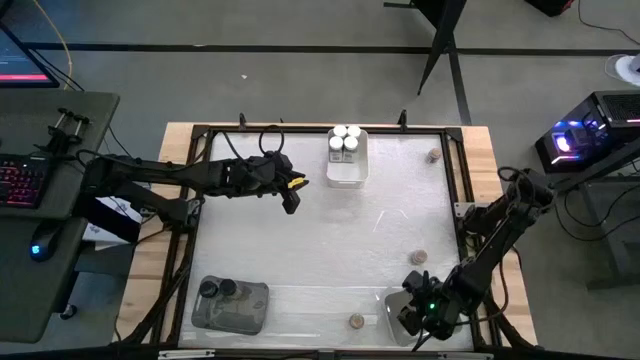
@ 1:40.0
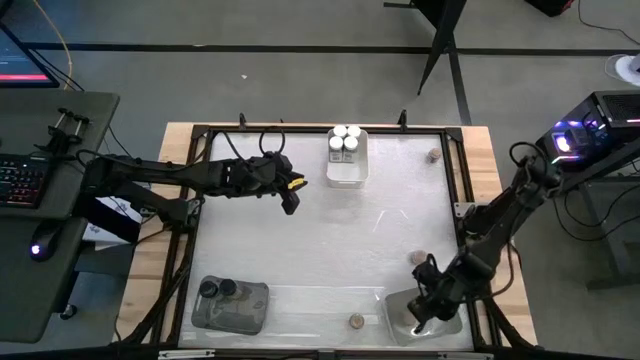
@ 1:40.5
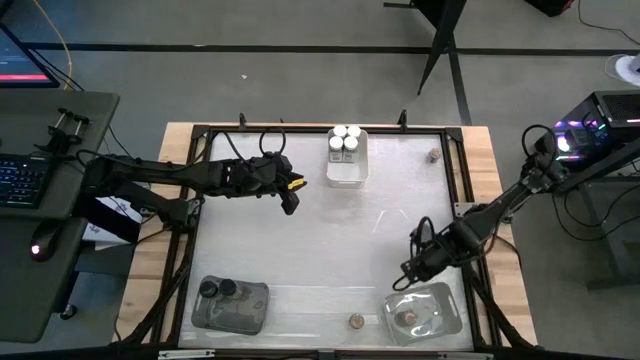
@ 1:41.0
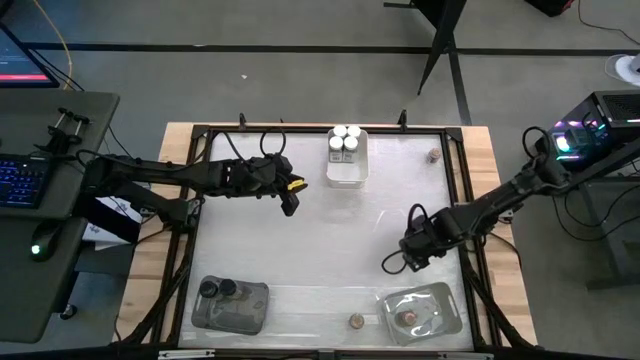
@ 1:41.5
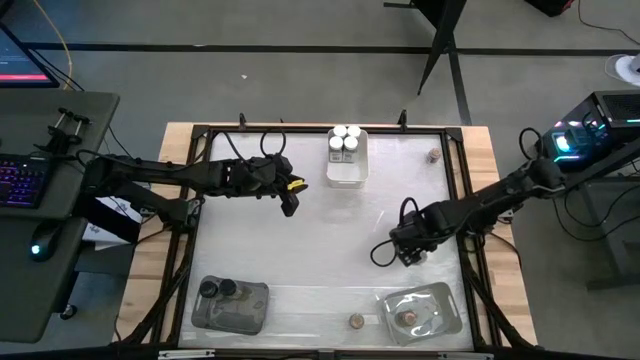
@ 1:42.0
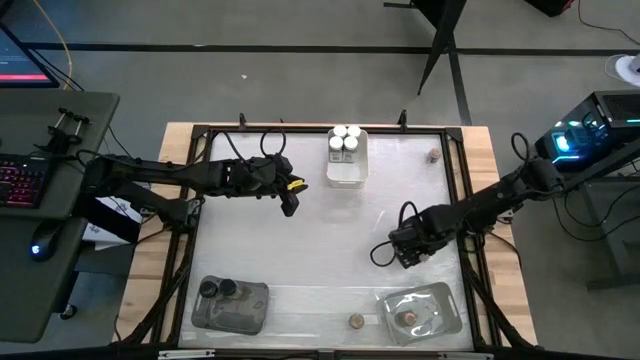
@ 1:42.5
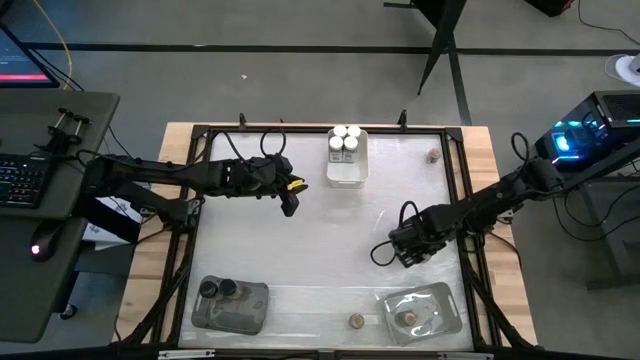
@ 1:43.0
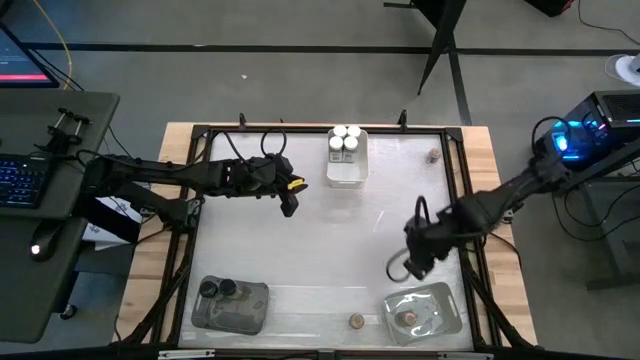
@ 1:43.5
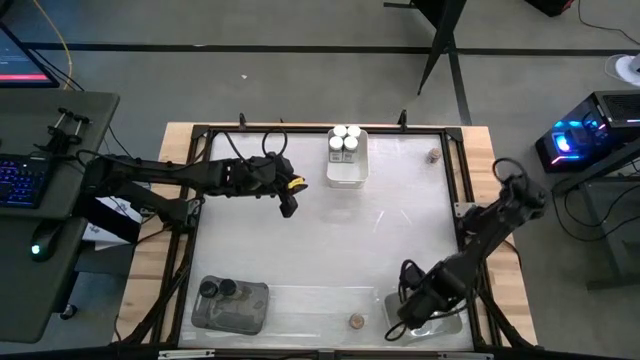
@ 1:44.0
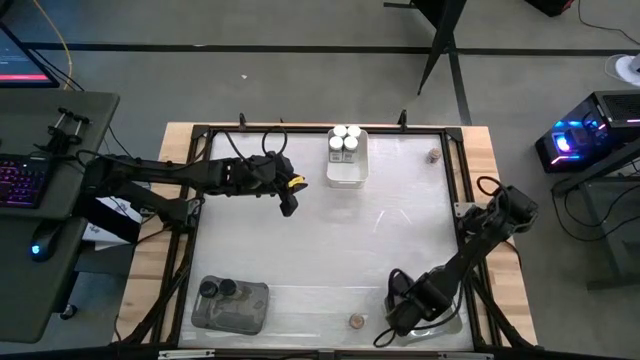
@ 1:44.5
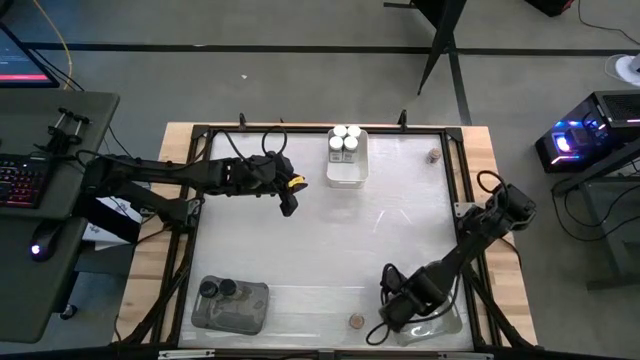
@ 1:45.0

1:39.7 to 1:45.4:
Task: Sort spices by type
Put the middle brown seasoning bottle into the gray bin

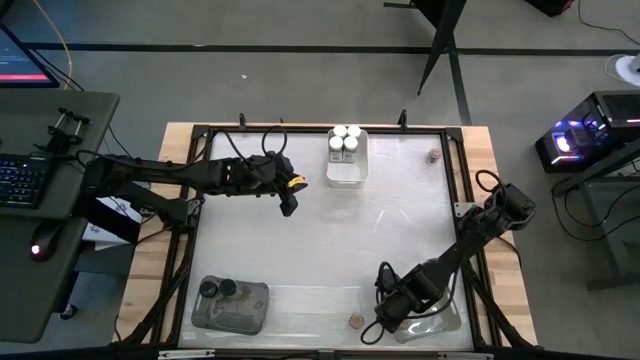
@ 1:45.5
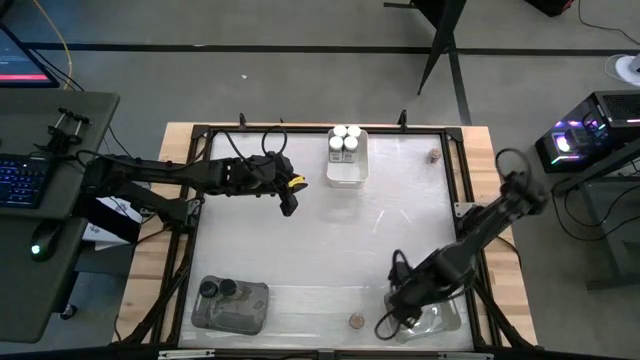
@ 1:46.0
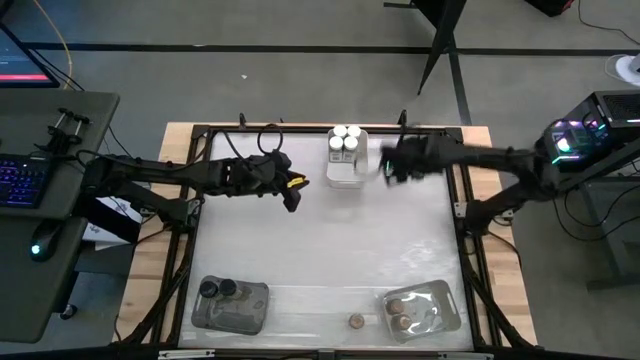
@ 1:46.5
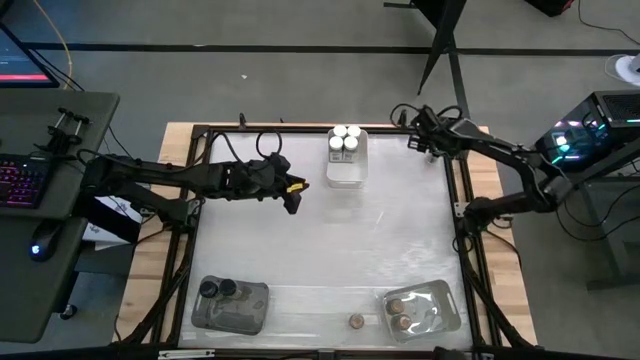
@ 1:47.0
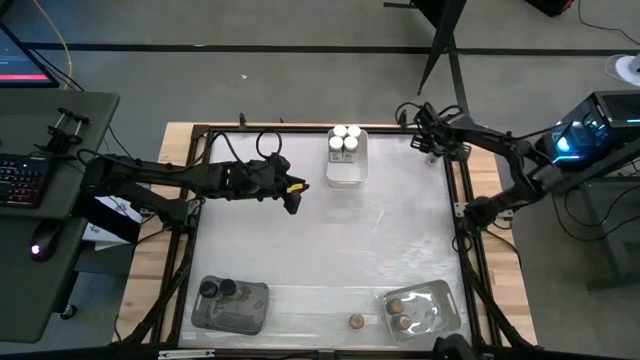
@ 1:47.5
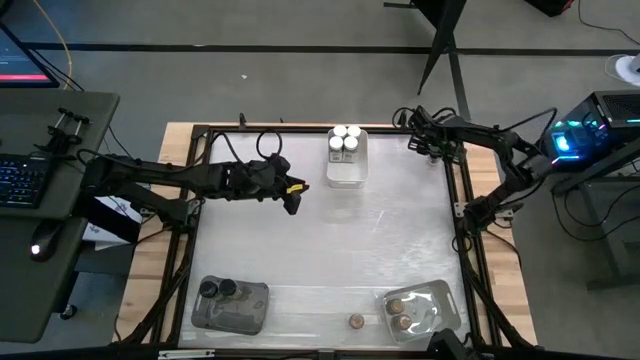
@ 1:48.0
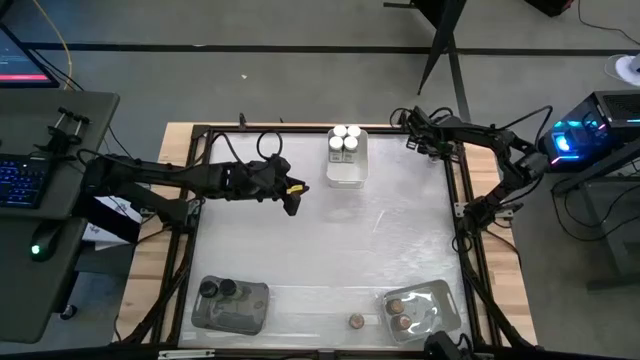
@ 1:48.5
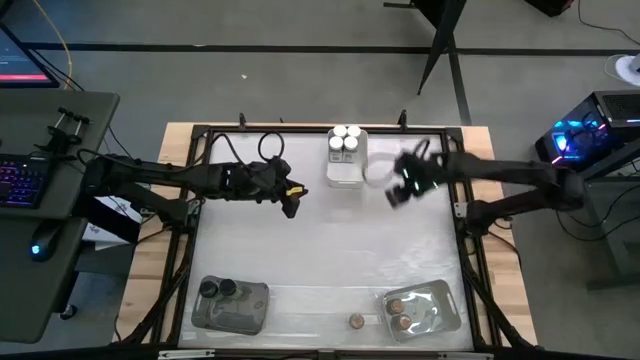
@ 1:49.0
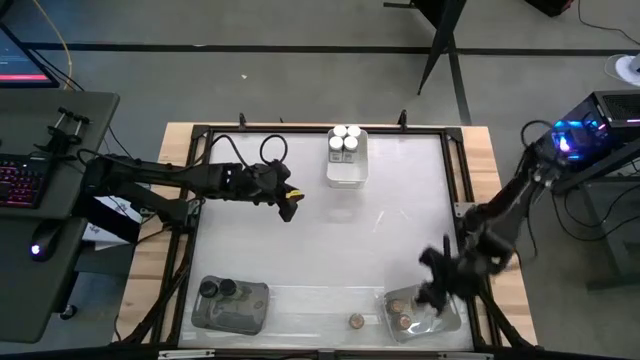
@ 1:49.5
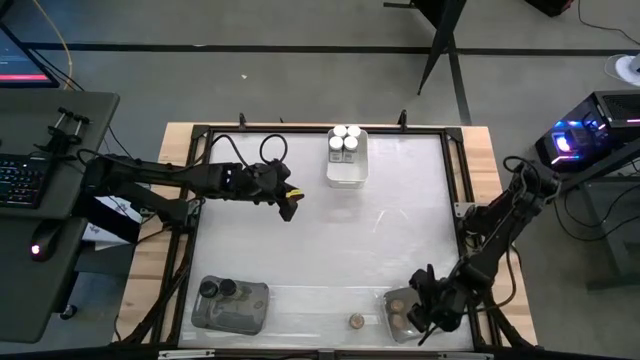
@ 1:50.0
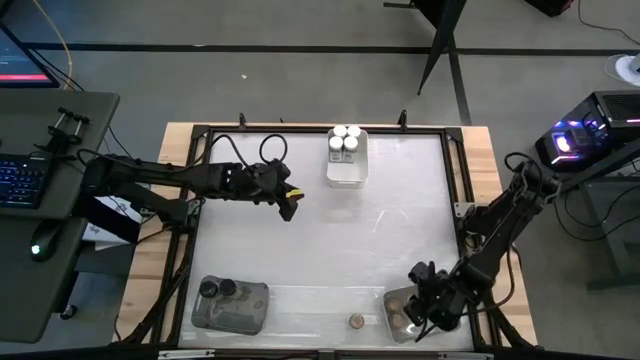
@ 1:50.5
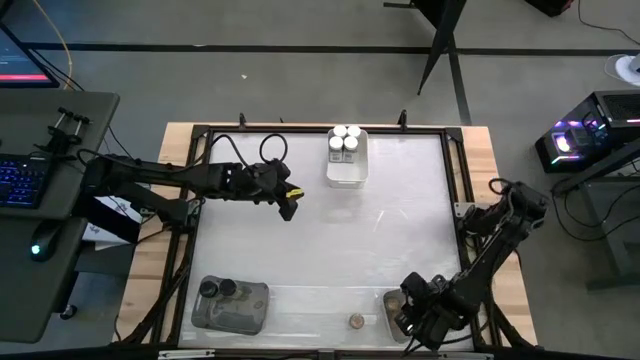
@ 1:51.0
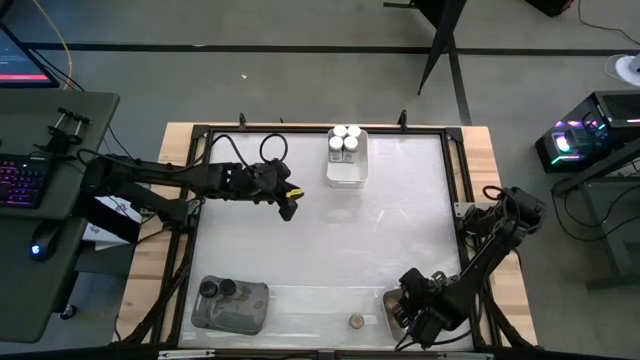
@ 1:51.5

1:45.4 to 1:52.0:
Put the top brown seasoning bottle into the gray bin

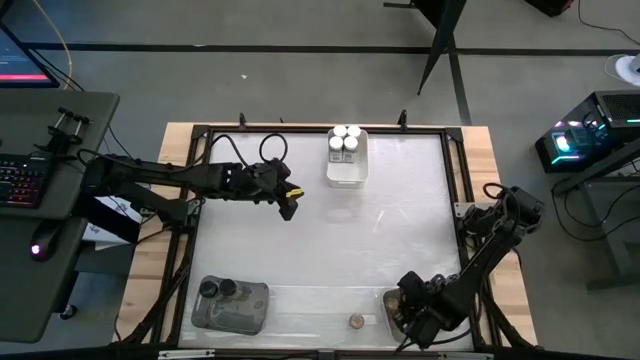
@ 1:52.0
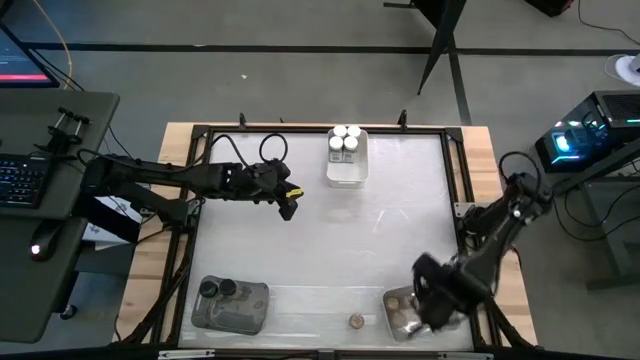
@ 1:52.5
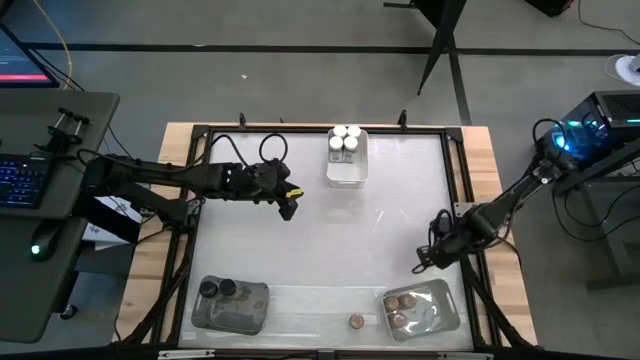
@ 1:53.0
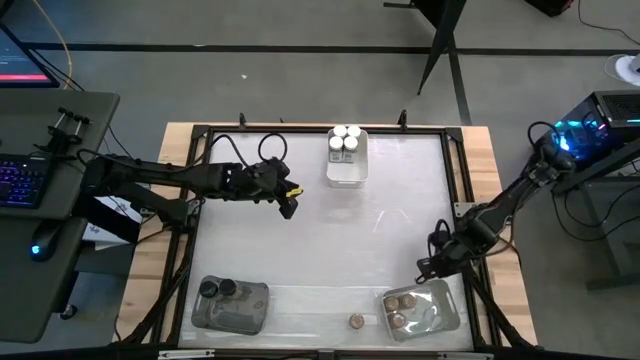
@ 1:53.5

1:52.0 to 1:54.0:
Adjust the gray bin

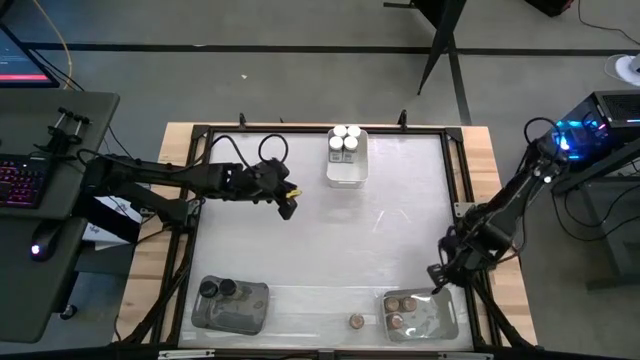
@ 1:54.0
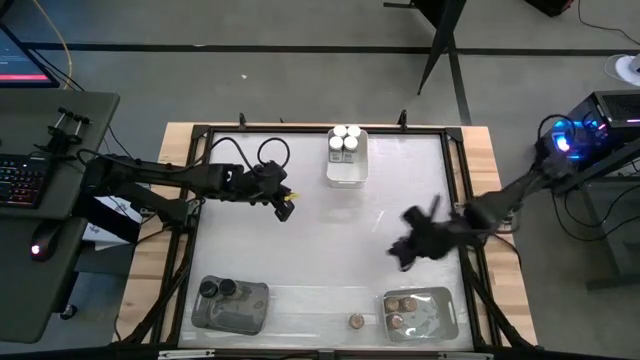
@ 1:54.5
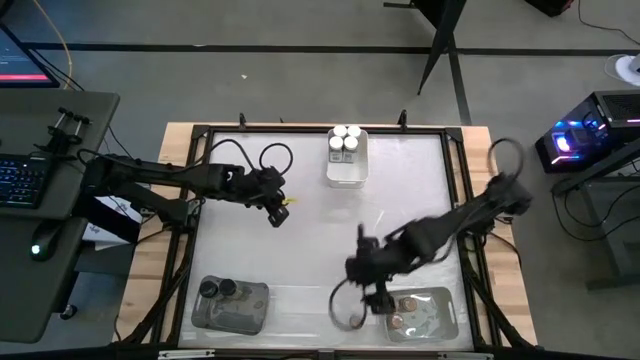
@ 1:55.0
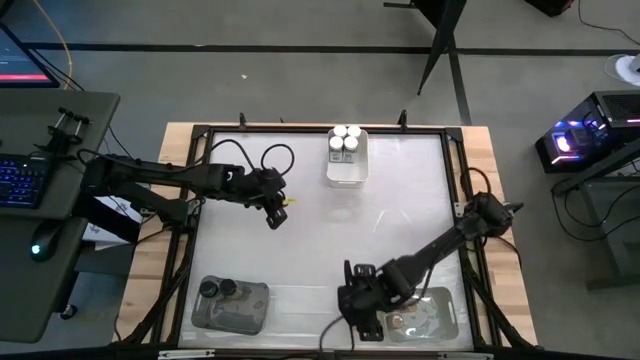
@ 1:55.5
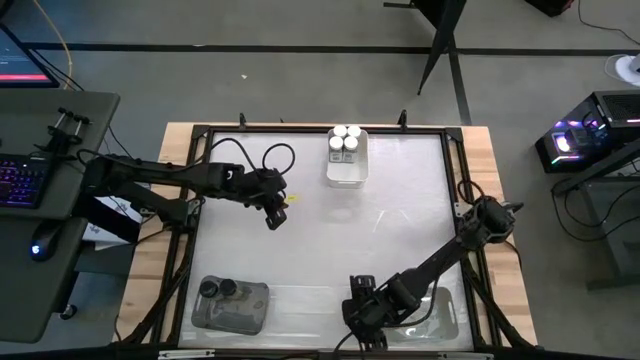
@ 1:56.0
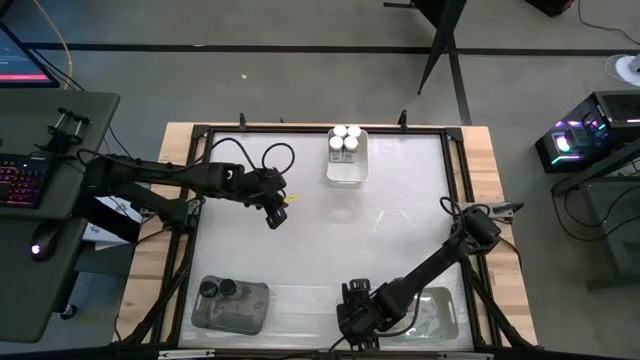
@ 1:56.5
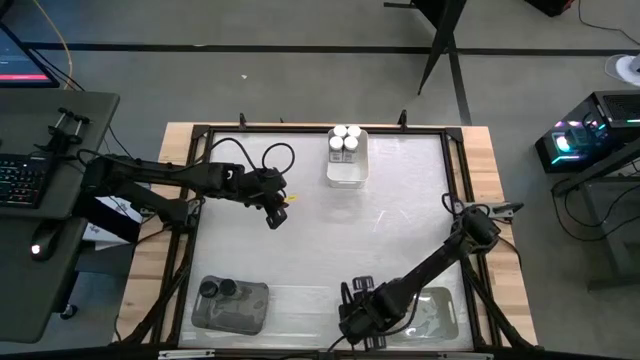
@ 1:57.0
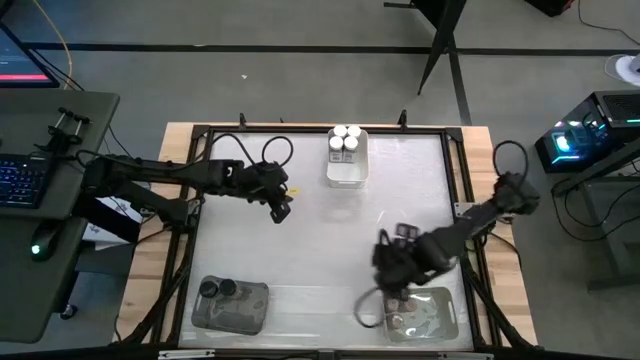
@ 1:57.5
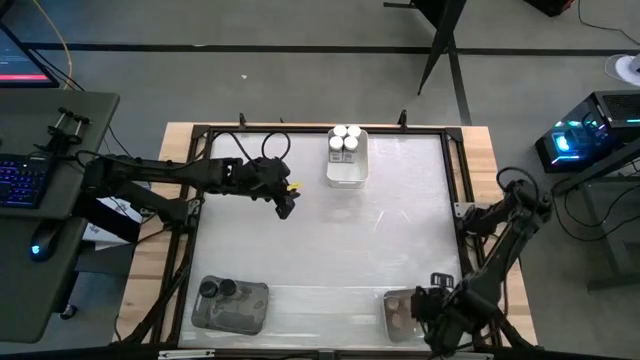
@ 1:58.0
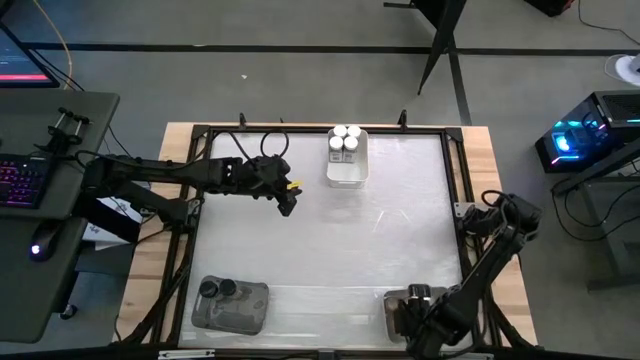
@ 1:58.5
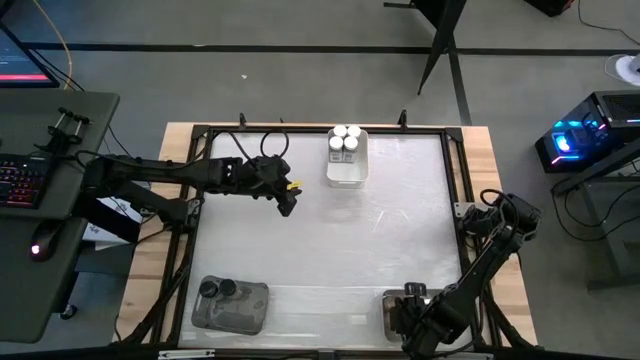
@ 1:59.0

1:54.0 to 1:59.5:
Put the brown seasoning bottle into the gray bin
